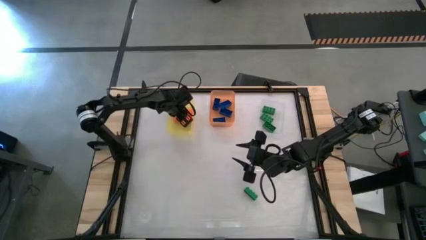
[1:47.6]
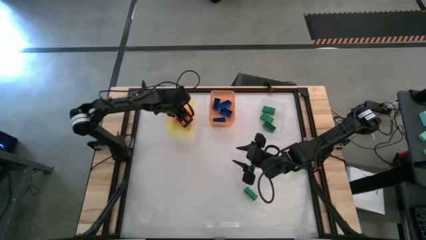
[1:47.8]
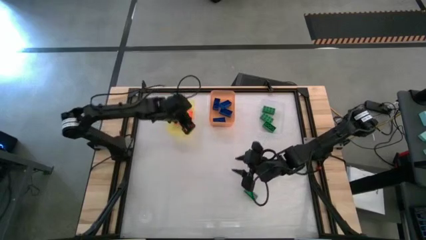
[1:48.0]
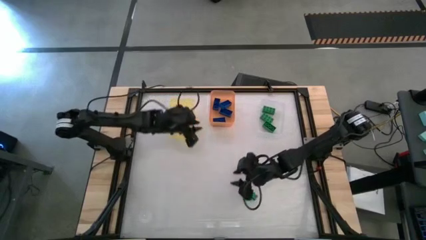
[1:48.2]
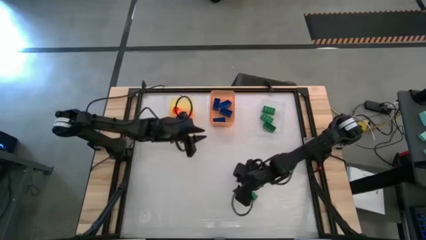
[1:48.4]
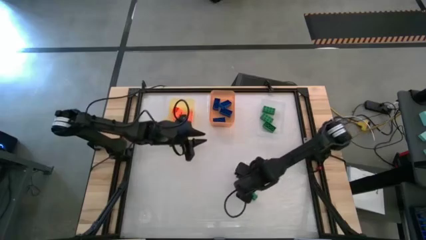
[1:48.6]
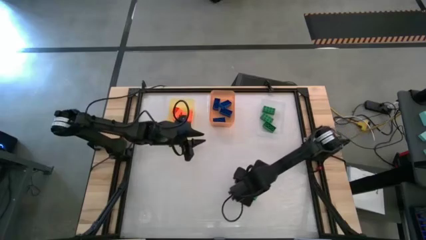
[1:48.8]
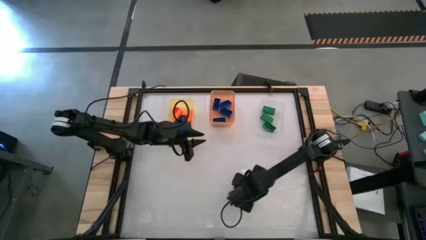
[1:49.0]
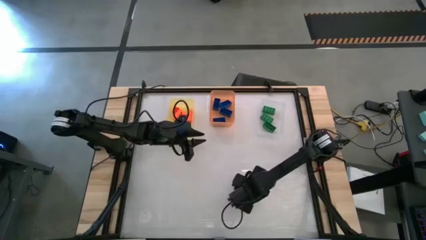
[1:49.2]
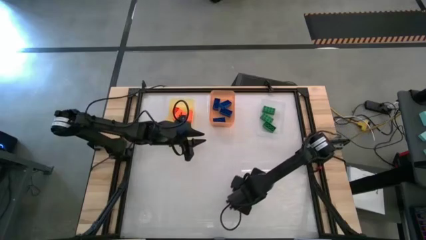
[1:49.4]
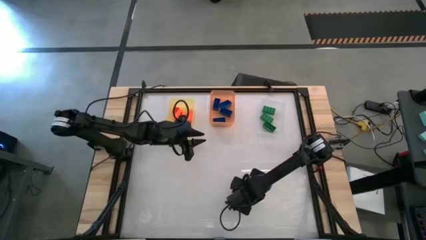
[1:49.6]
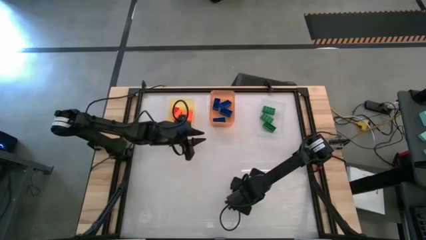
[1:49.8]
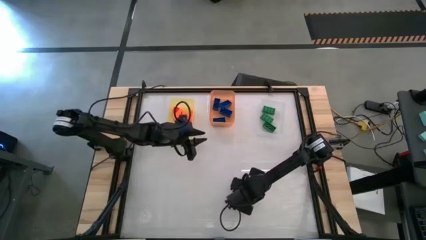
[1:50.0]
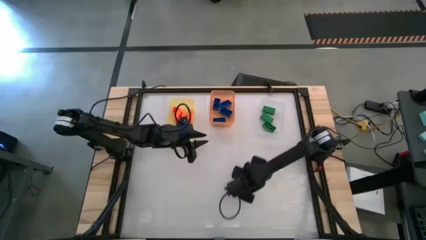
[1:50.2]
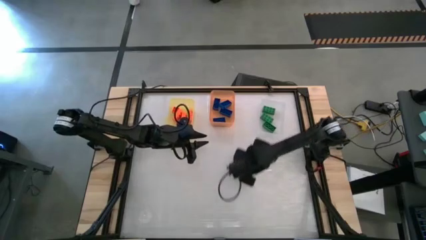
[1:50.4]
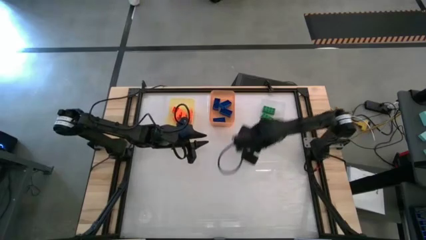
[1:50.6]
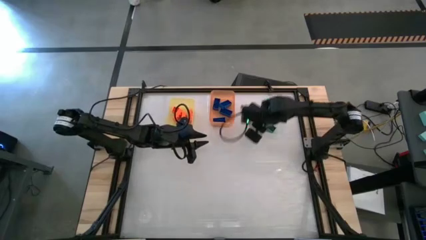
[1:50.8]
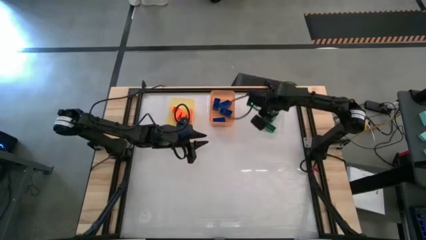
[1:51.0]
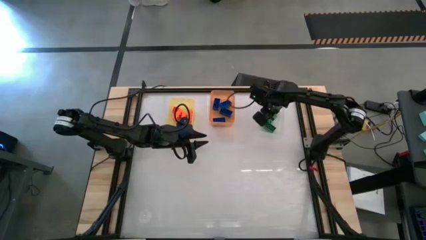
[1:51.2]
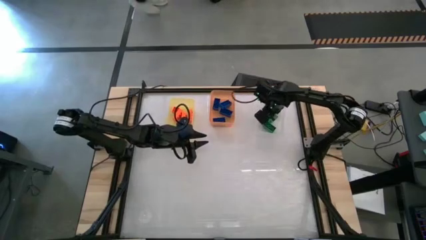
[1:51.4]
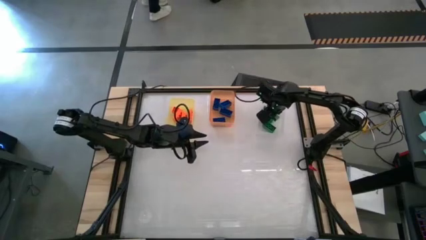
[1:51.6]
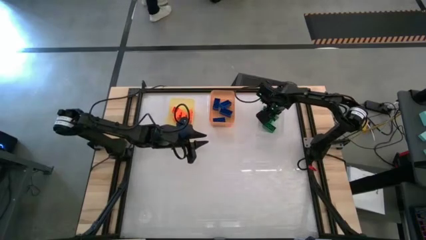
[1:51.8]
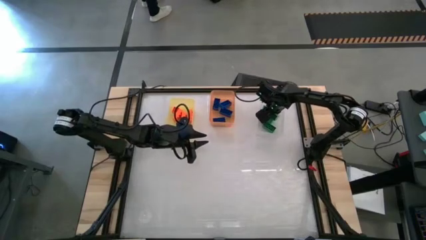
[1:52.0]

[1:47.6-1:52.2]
Task: Sort & place blocks by color
Put the green game piece into the transparent bin

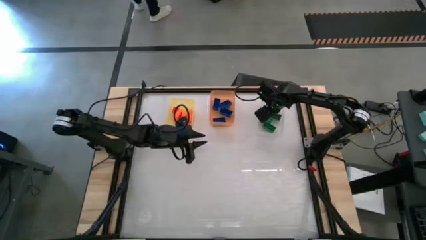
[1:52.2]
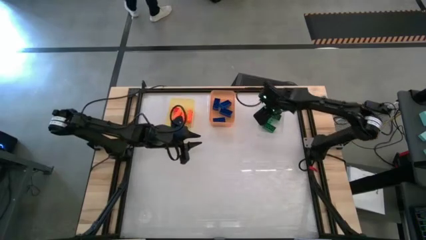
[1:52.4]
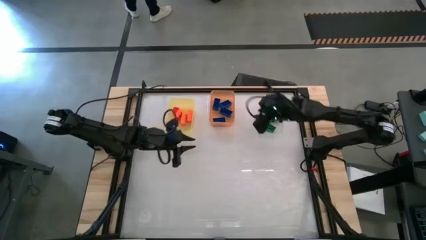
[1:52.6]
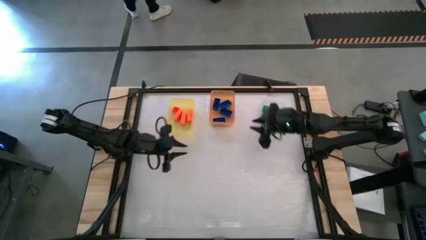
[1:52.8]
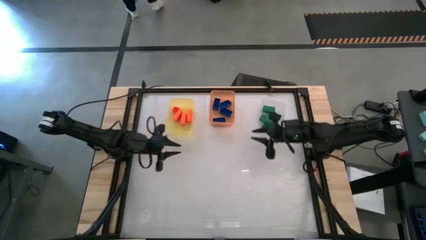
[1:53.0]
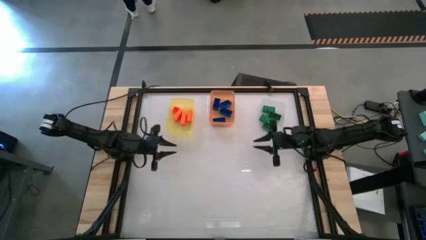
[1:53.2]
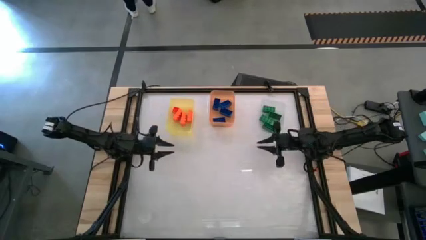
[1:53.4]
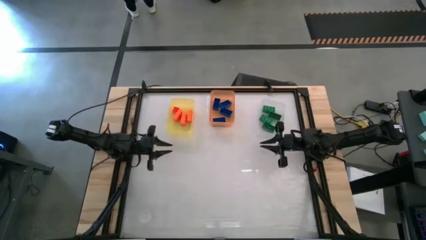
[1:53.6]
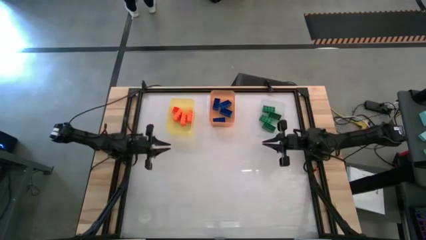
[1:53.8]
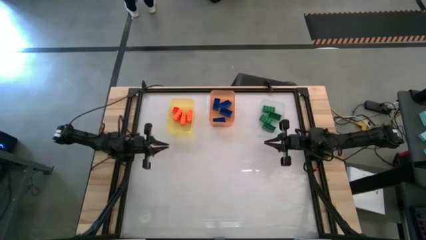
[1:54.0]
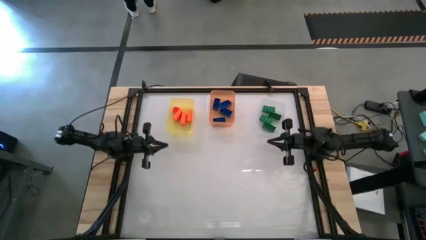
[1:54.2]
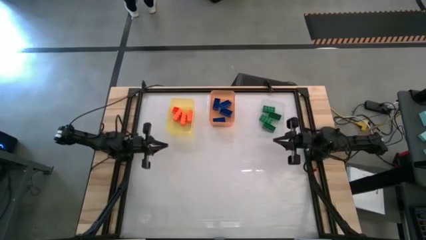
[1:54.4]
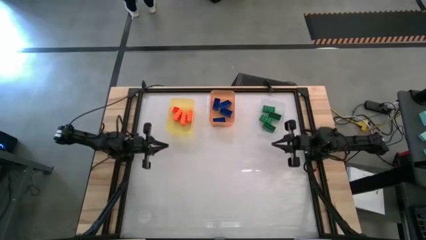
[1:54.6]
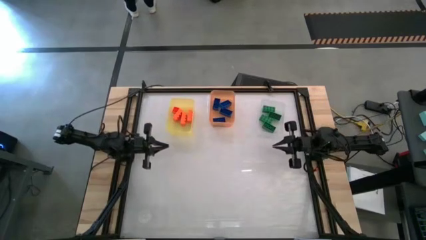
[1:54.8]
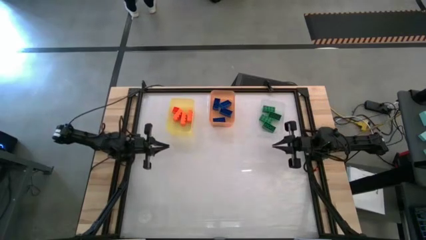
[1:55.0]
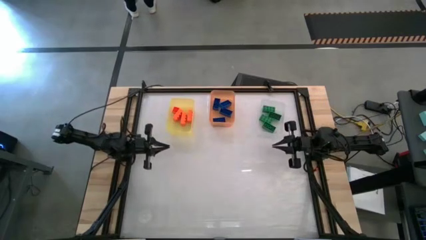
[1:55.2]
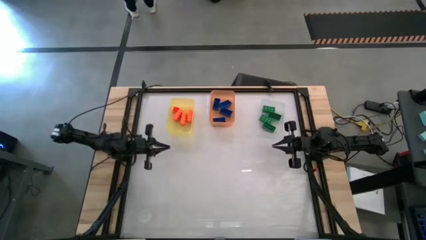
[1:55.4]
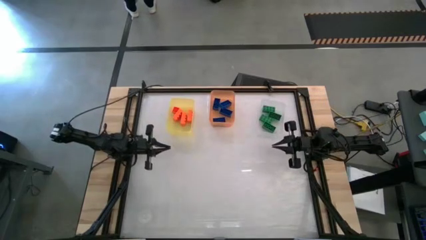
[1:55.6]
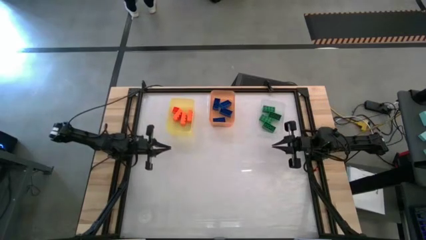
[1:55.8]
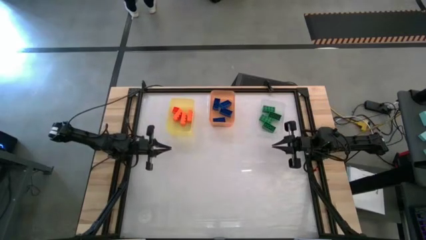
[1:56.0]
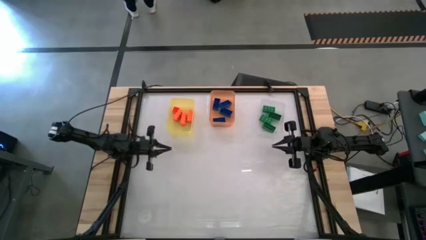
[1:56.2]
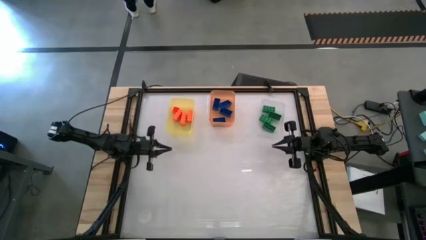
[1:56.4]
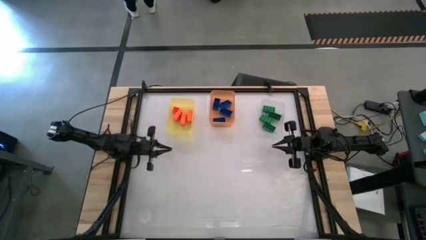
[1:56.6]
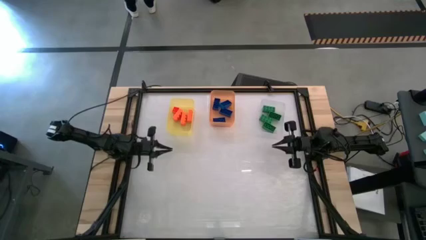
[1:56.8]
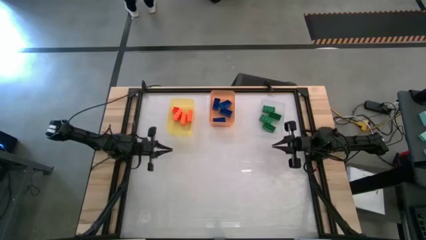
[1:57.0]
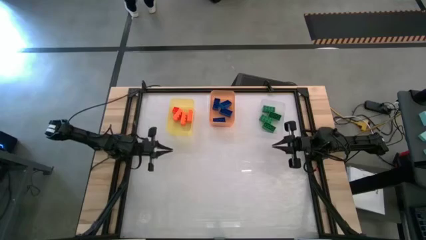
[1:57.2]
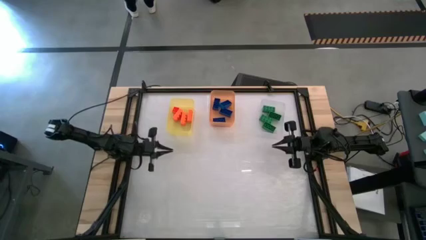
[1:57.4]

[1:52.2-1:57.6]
Return to Home Position

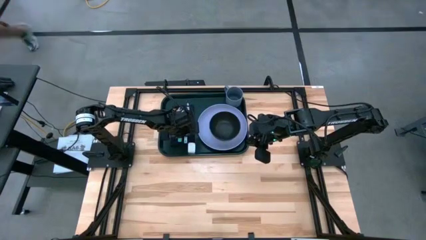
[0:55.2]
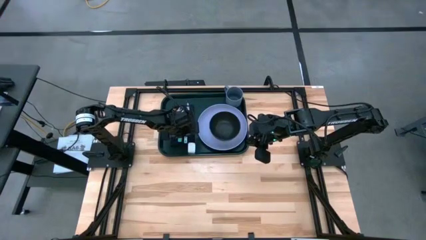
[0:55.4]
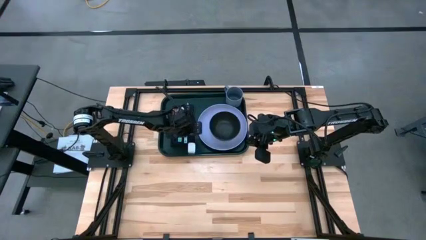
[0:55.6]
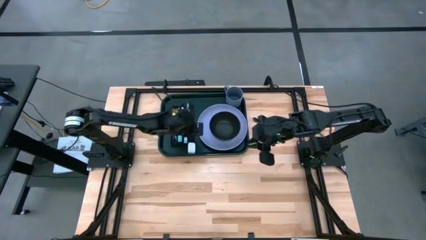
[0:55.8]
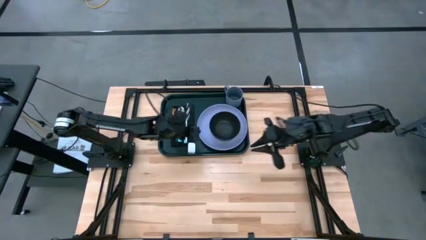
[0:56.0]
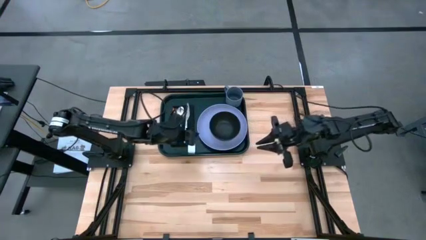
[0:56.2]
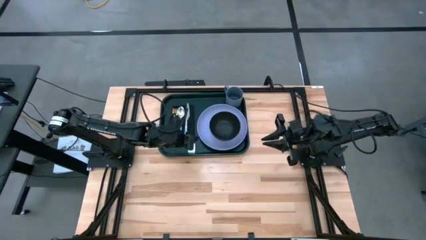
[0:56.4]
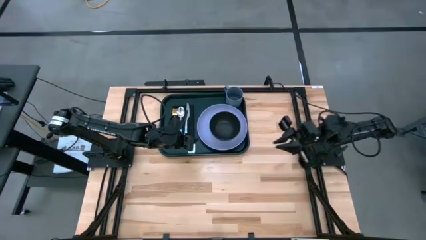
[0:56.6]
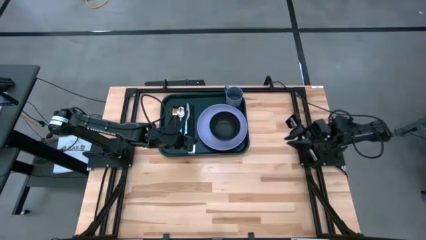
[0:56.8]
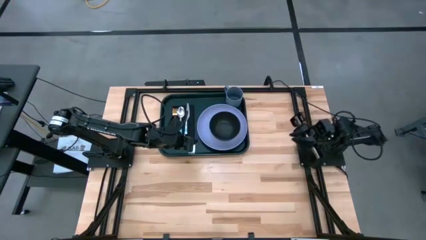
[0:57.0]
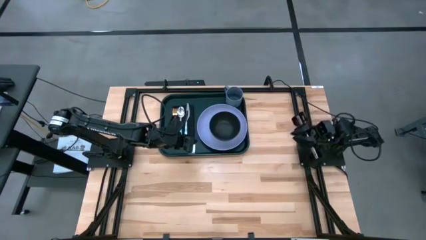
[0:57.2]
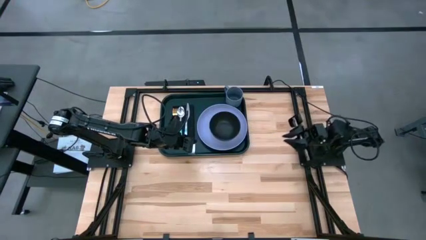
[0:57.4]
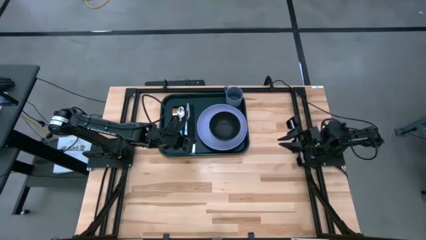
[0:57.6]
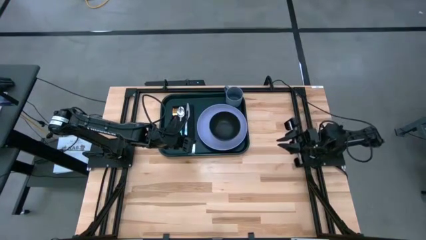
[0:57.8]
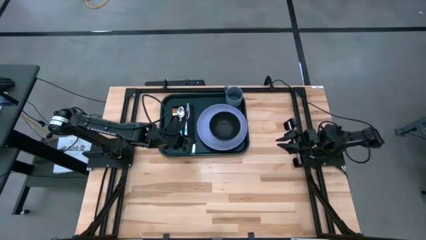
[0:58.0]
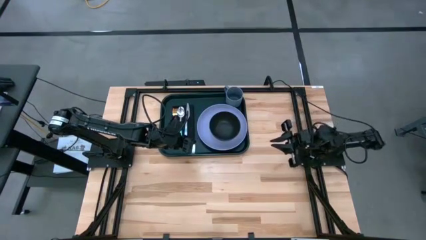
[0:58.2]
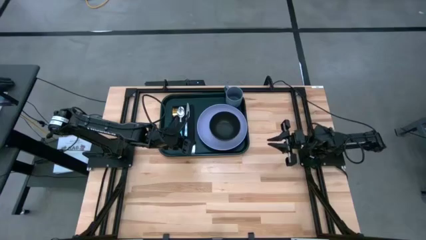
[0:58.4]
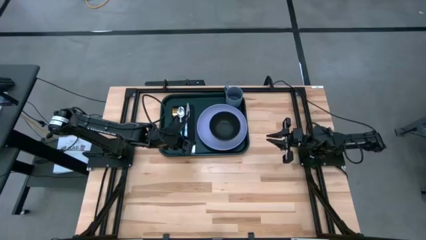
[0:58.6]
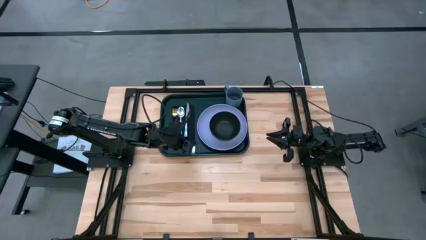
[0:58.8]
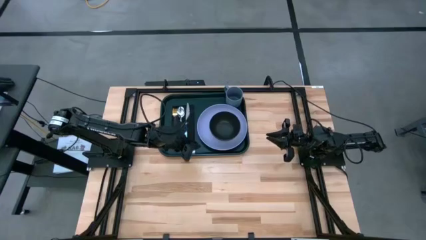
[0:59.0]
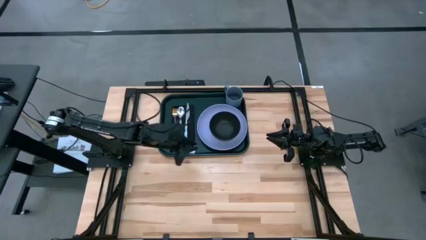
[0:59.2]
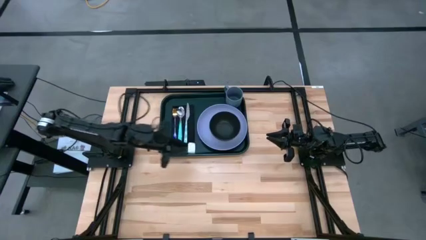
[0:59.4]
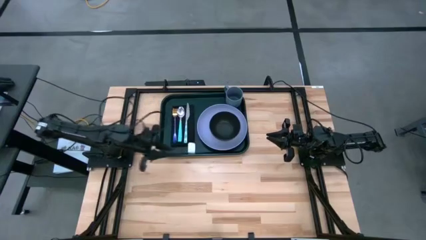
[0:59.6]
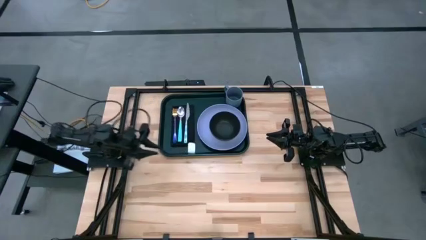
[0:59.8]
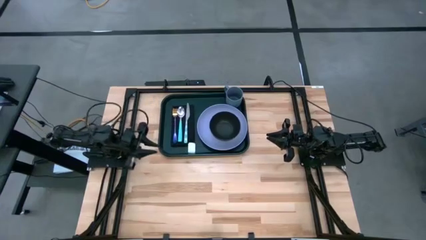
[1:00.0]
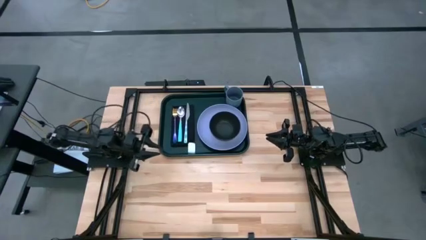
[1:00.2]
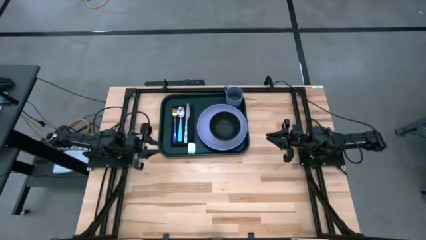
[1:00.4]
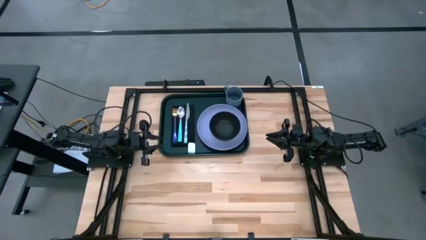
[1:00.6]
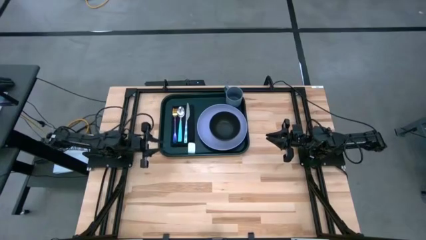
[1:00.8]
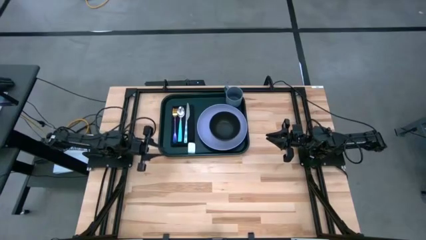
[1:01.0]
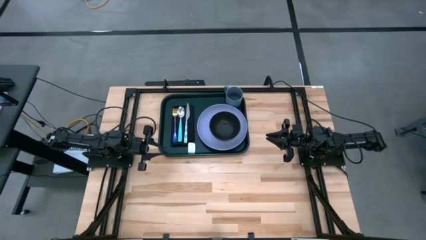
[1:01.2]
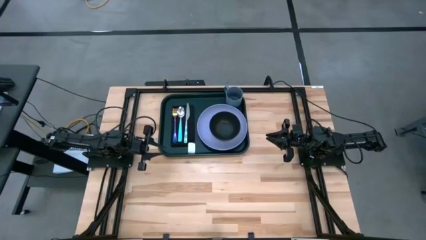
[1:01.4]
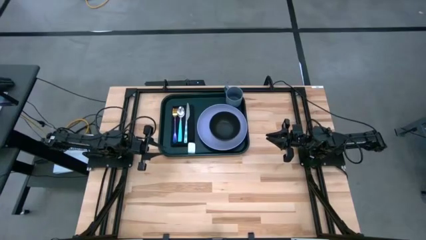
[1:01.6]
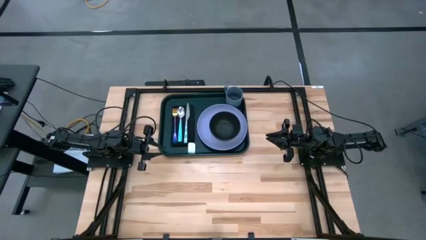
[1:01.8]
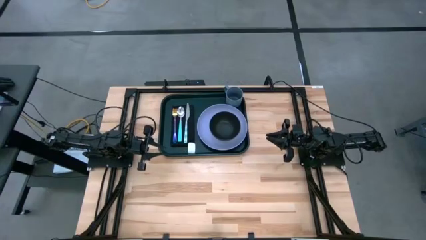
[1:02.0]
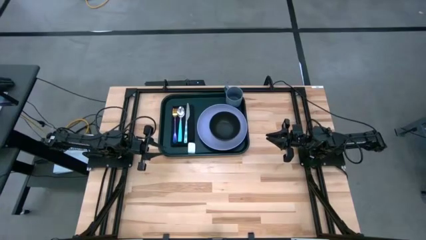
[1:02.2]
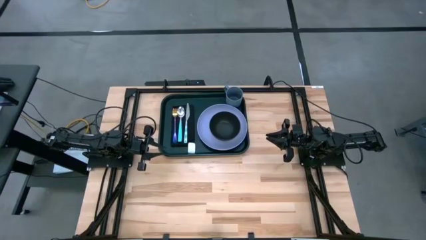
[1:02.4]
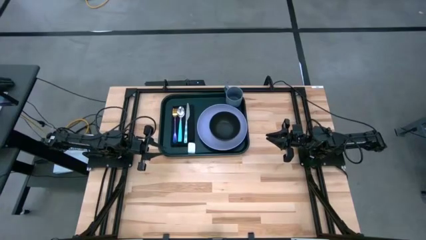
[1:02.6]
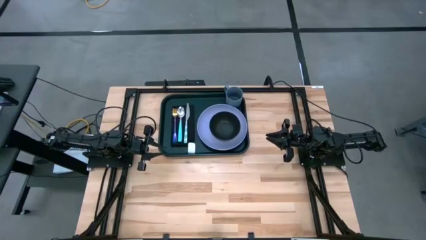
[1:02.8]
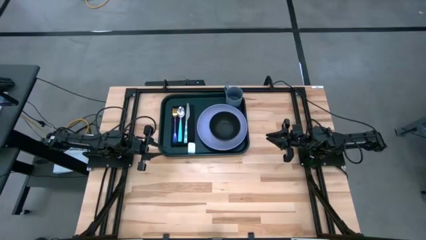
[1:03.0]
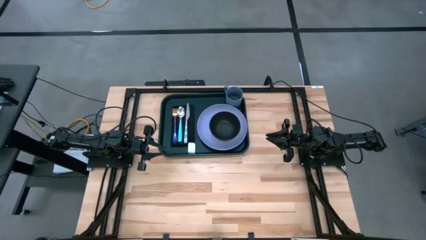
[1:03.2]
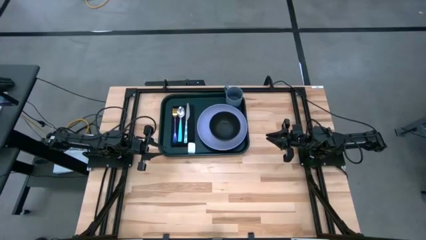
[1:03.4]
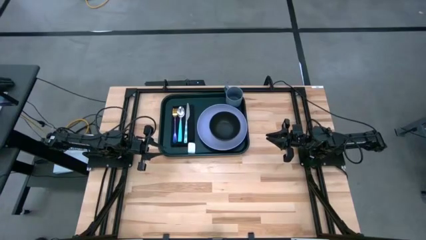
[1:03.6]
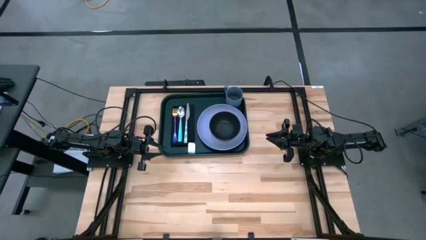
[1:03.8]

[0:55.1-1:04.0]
Task: Set up tray
Return to Home Position
